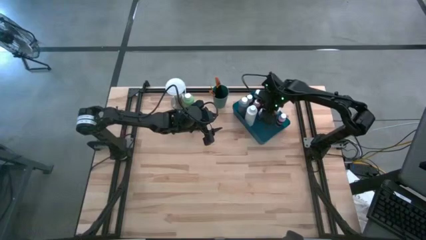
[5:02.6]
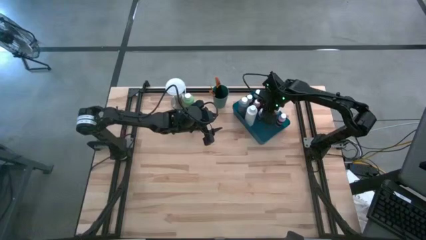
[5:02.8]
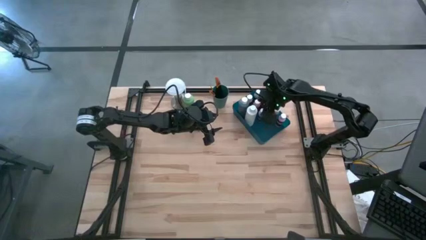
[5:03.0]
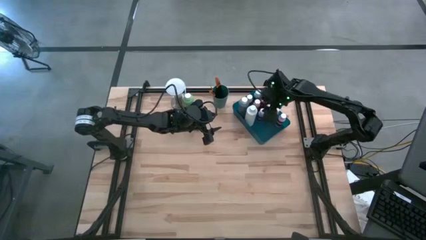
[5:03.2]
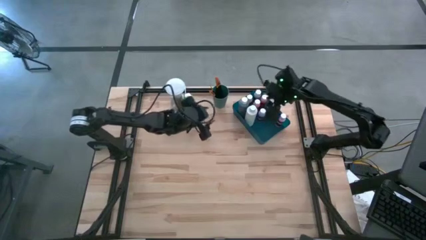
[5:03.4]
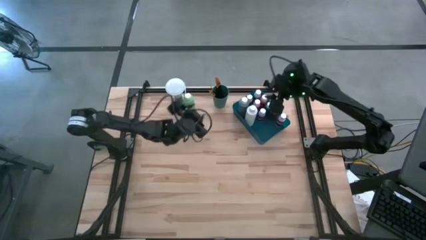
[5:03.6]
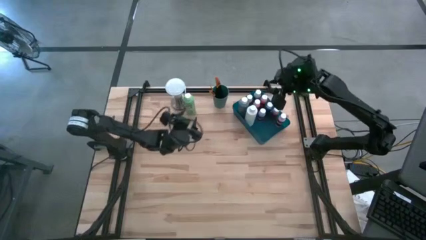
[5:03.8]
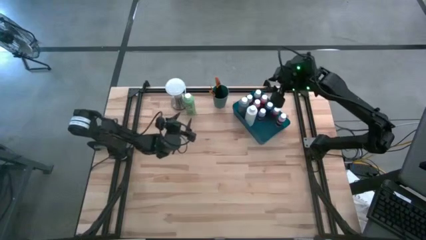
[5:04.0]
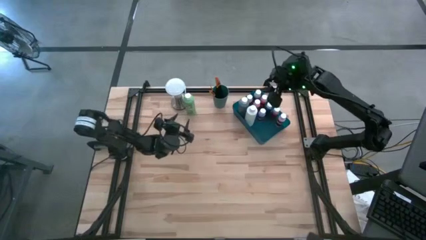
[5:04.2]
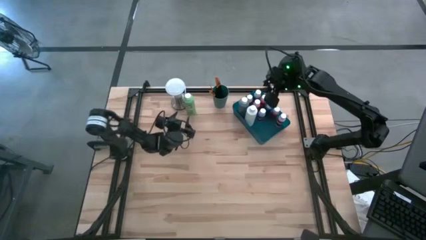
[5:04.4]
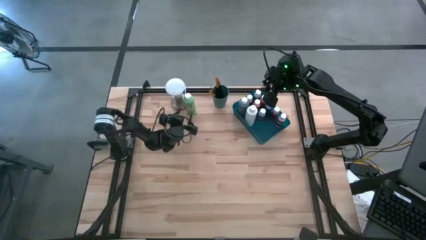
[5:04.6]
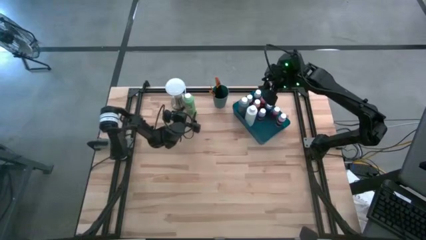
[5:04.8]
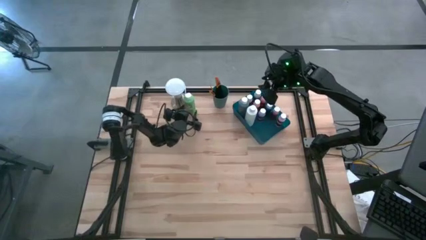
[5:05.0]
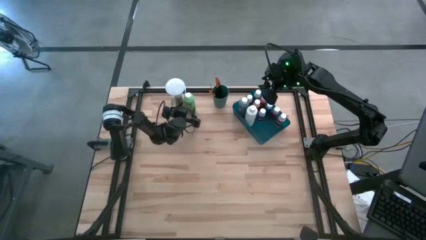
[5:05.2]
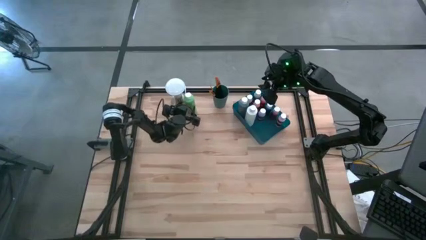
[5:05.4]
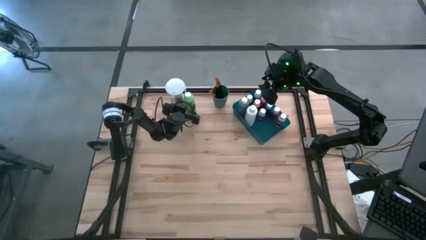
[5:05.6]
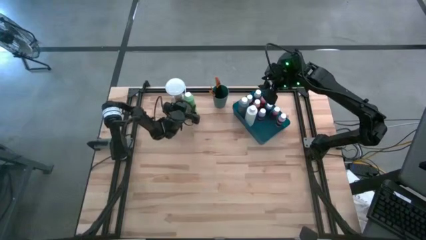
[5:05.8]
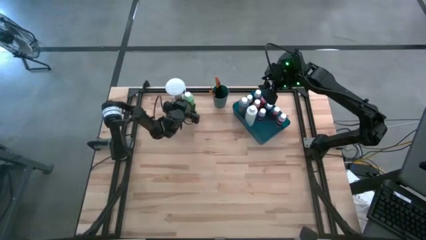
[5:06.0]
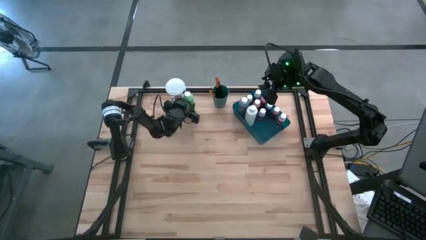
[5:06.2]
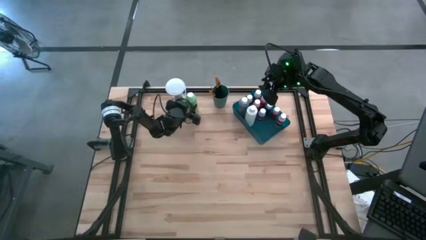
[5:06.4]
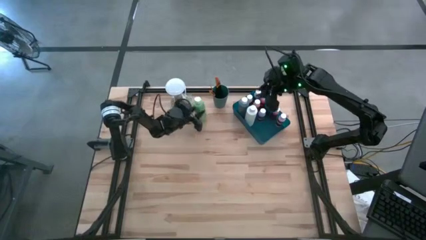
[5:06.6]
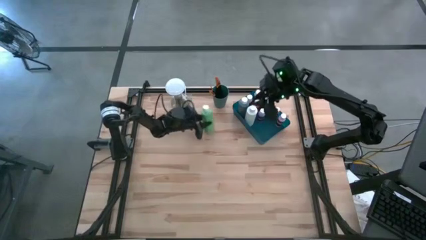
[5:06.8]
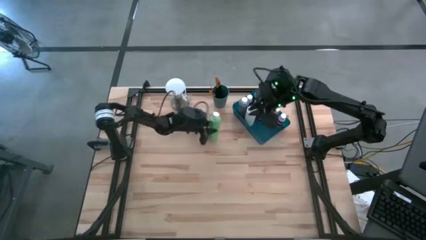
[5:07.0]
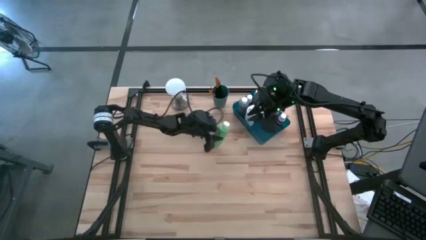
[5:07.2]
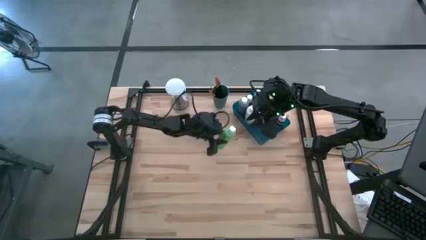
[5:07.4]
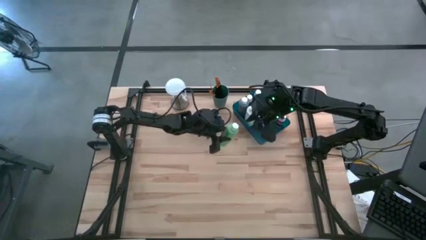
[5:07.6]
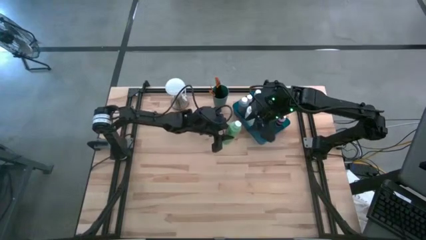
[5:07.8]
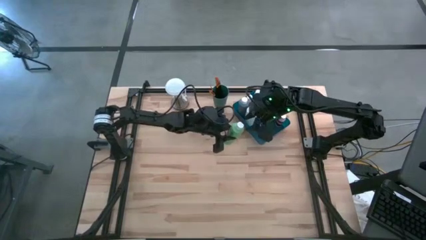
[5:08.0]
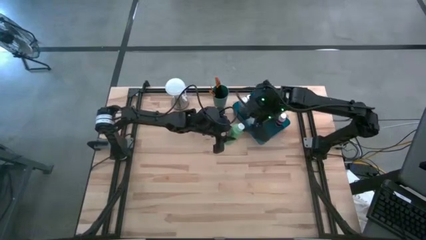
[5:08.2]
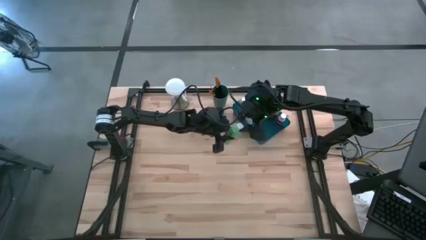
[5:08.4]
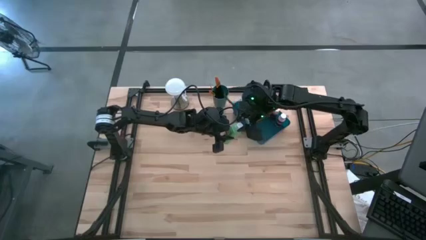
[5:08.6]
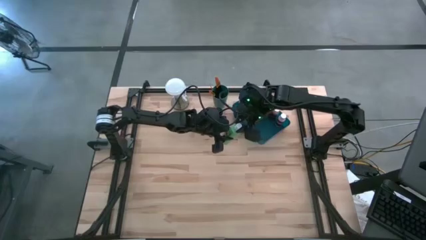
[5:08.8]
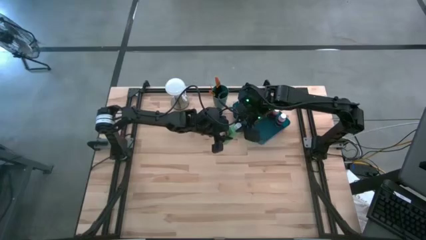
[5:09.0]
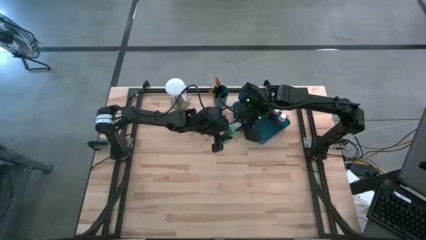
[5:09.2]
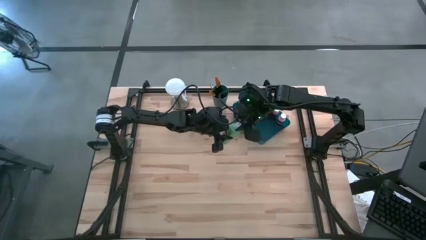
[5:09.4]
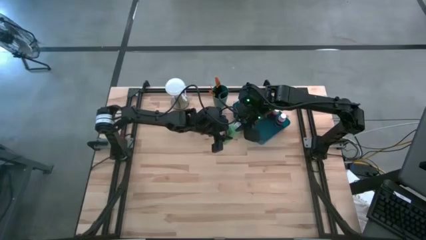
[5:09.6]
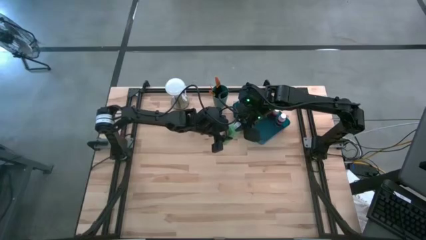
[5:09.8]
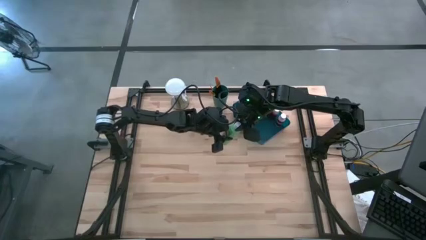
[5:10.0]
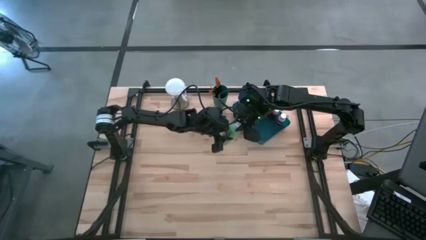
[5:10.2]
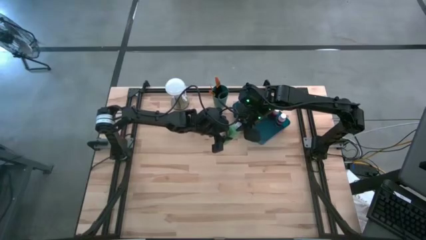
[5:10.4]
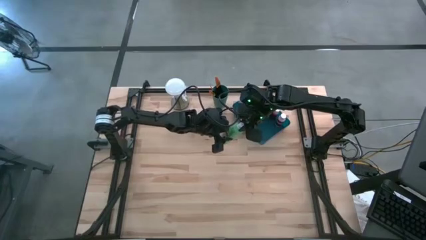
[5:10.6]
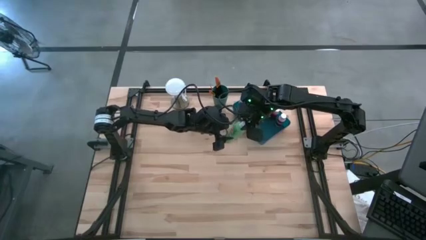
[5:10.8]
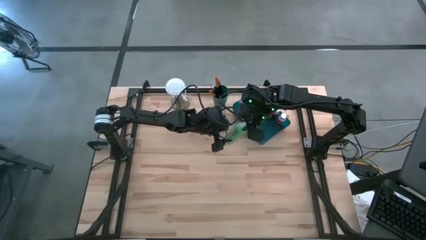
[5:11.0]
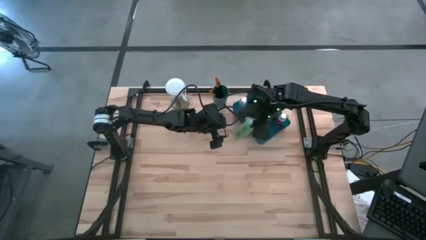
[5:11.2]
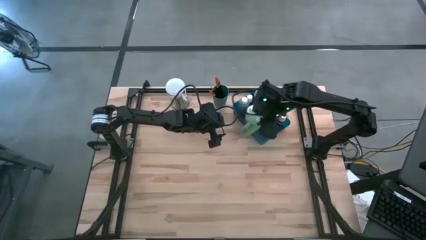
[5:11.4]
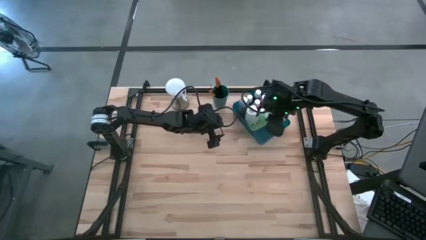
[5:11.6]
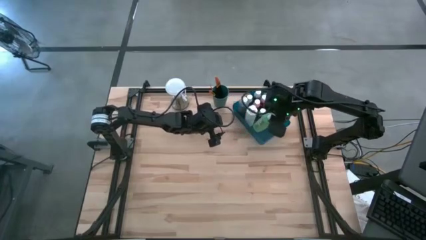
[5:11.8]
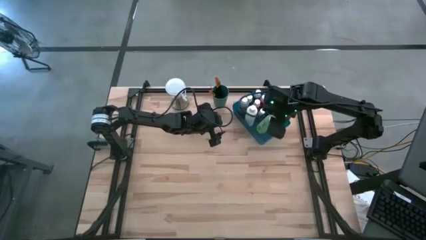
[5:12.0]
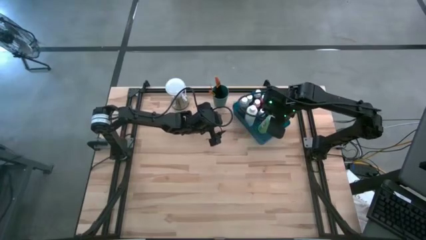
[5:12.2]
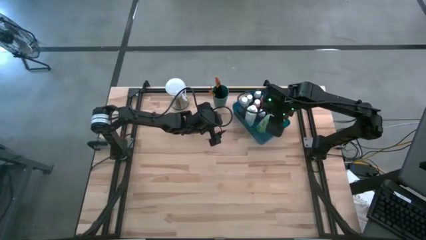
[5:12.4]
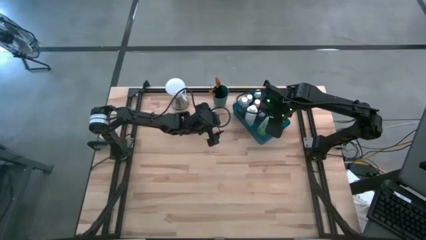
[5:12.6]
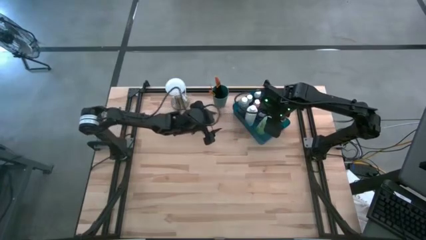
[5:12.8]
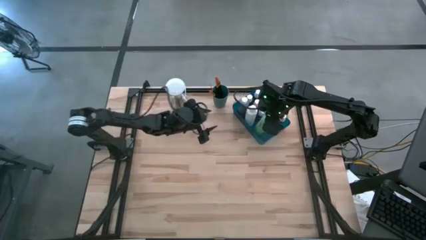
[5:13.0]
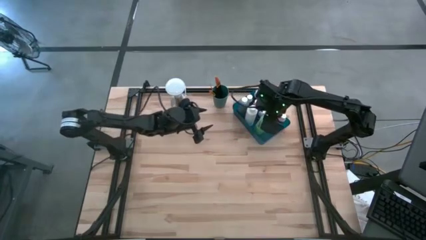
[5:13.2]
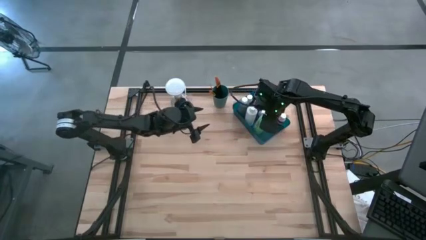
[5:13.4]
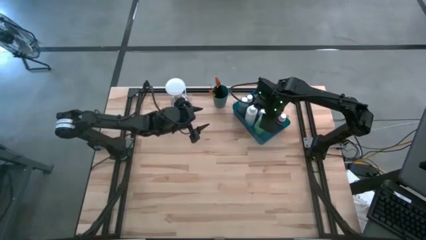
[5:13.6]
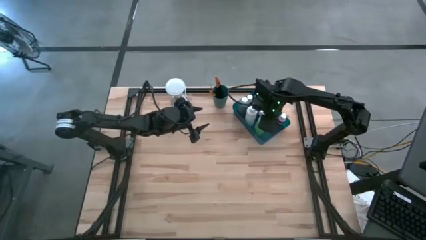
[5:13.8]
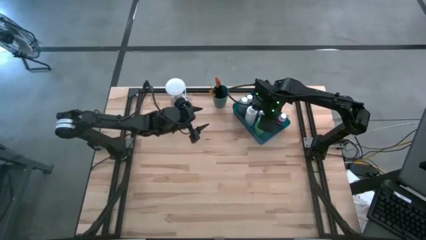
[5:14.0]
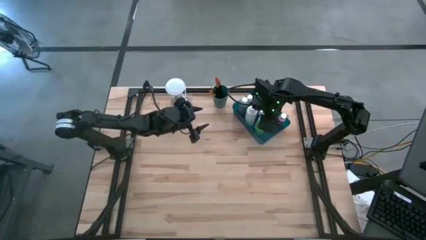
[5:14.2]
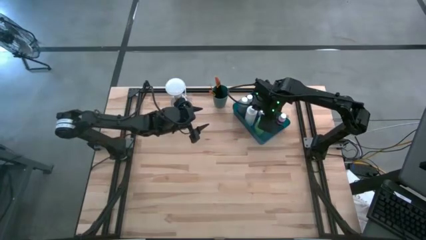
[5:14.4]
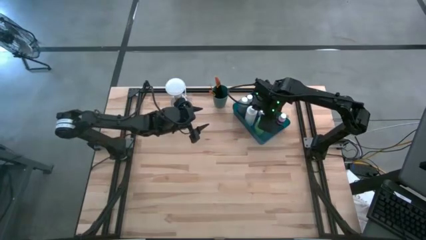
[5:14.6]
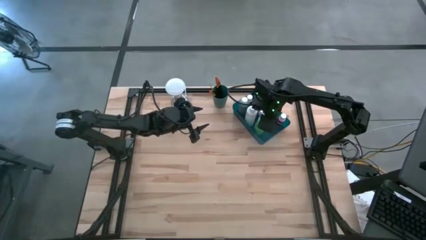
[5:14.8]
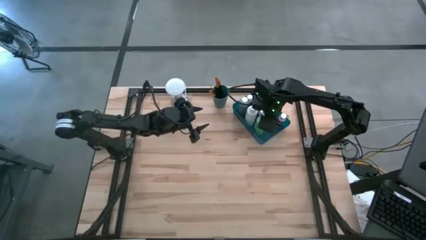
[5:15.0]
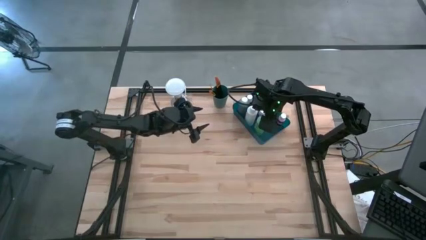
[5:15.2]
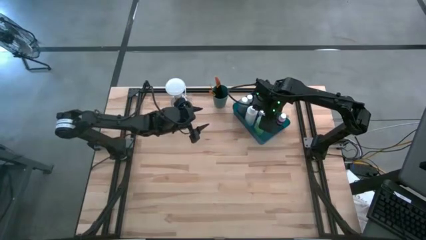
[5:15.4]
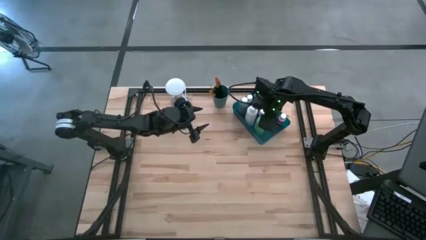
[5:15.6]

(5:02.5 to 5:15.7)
Task: Pick & Place Paint Supplies
Put the green paint bottle into the blue bin
